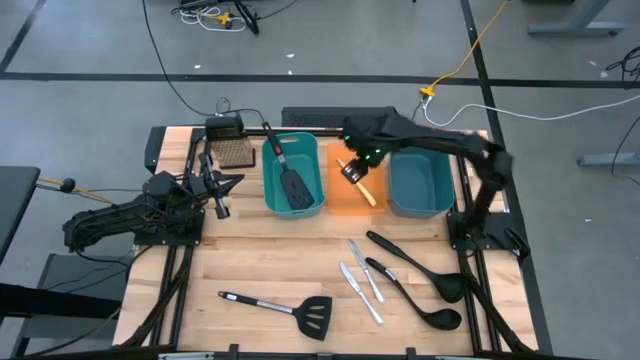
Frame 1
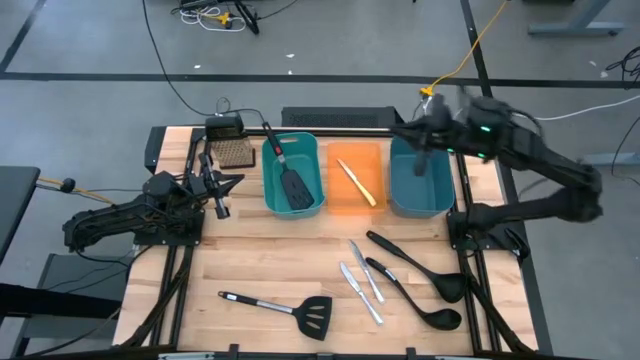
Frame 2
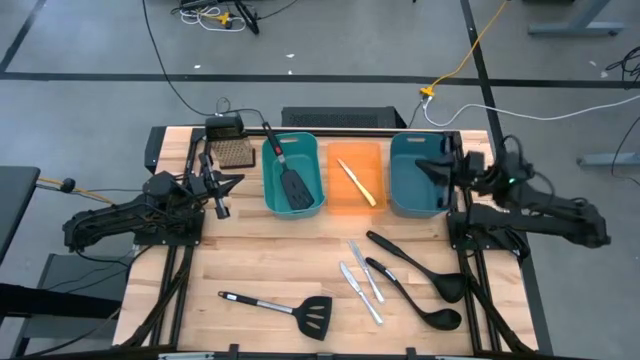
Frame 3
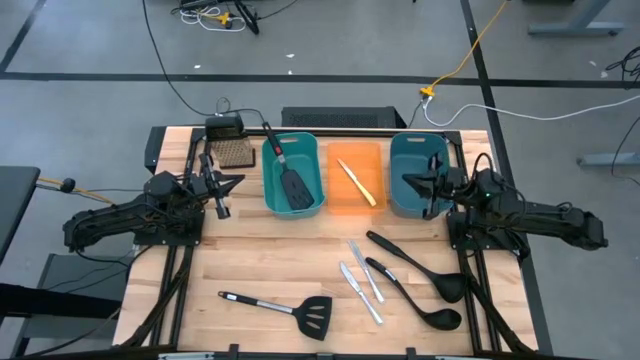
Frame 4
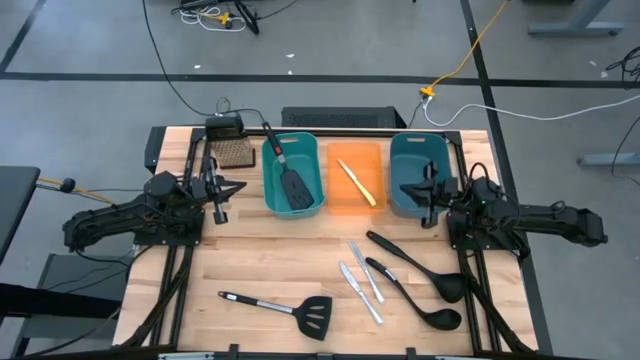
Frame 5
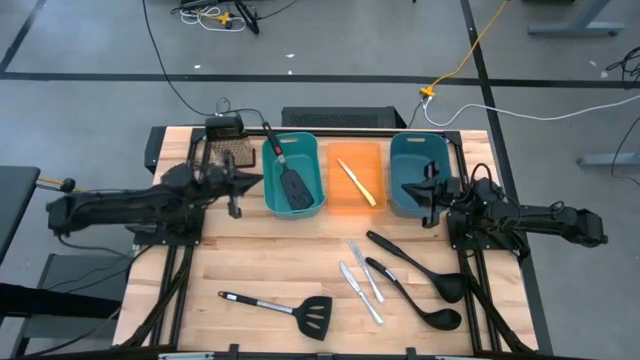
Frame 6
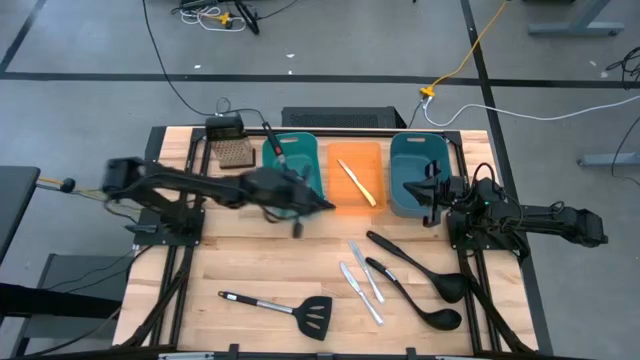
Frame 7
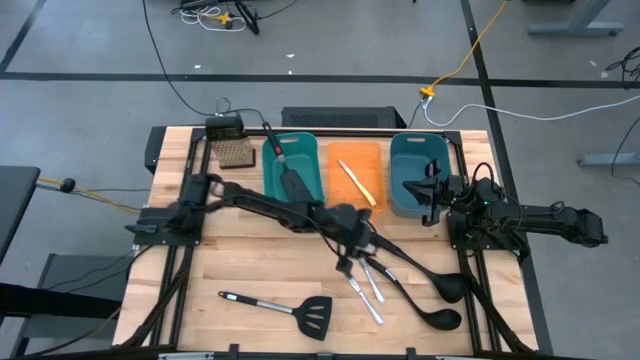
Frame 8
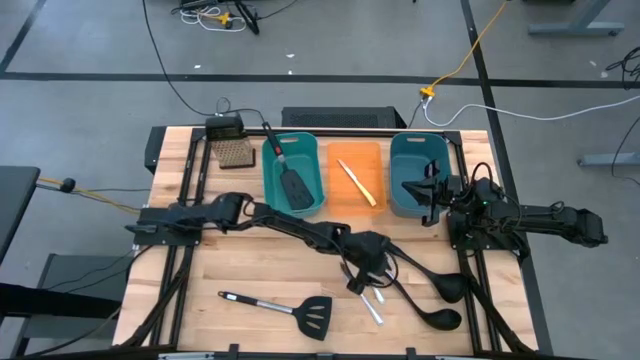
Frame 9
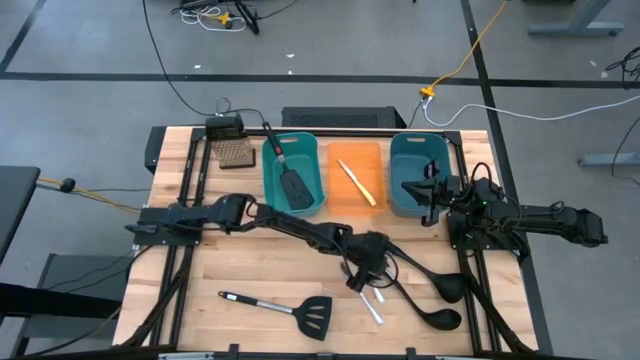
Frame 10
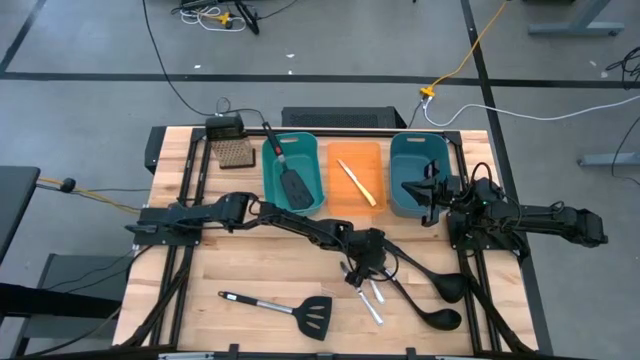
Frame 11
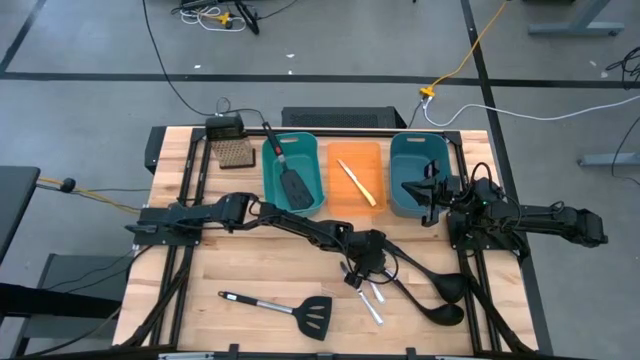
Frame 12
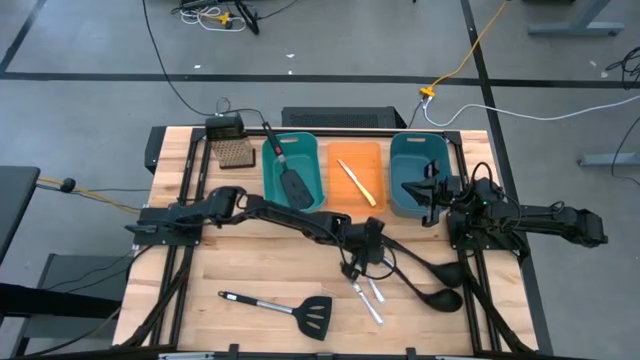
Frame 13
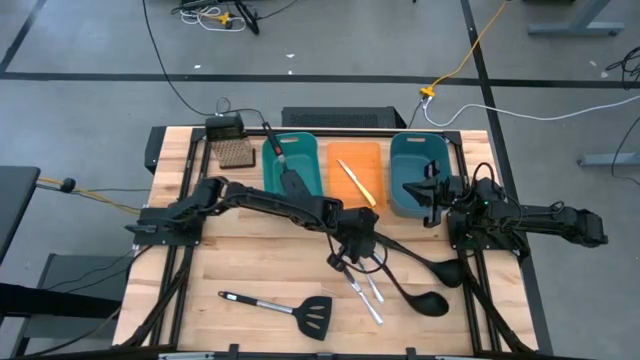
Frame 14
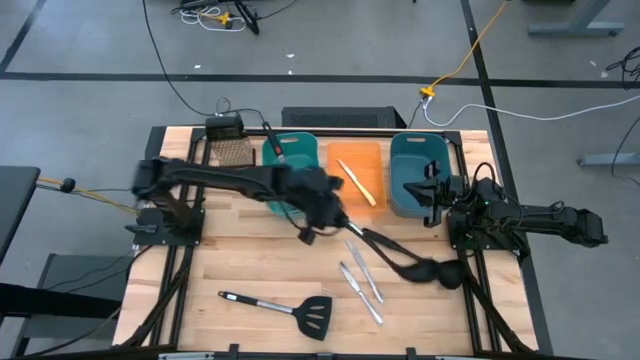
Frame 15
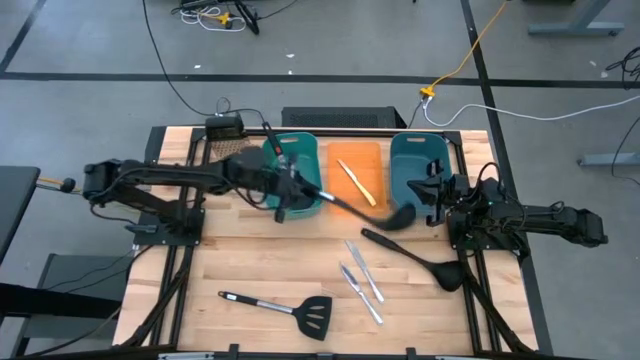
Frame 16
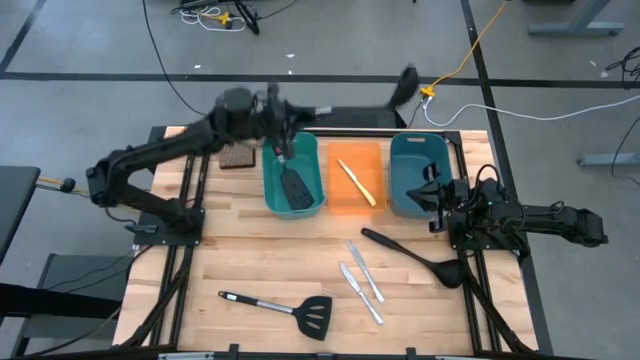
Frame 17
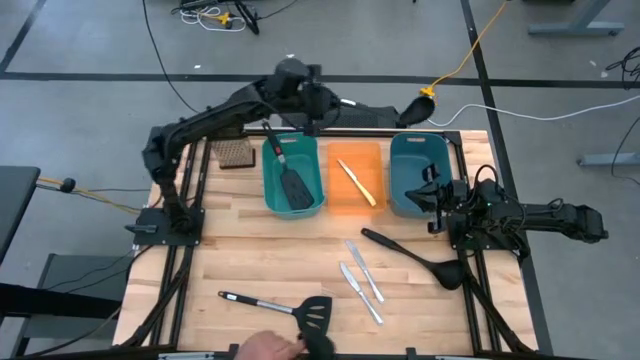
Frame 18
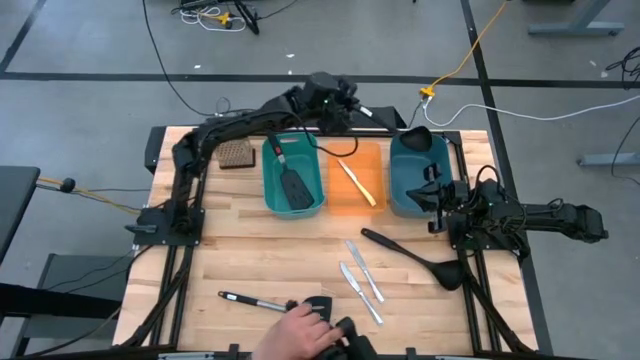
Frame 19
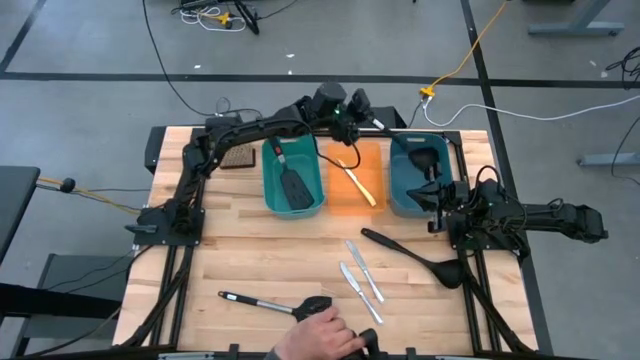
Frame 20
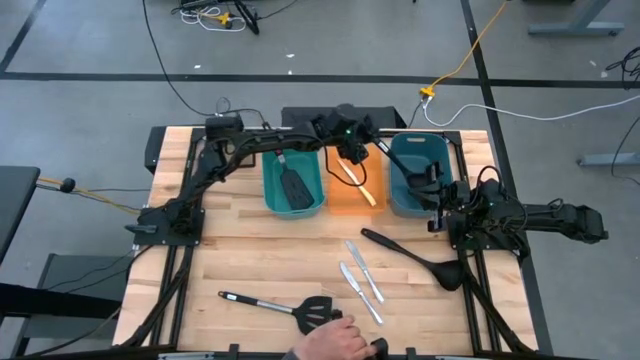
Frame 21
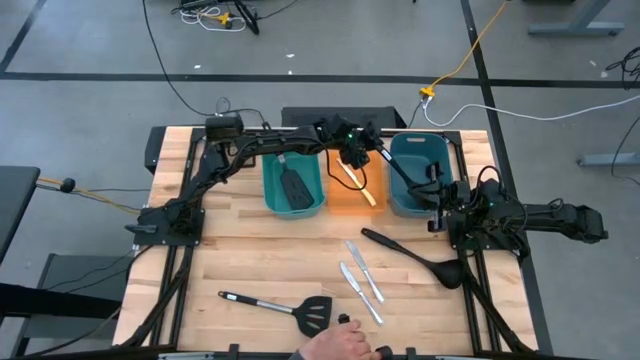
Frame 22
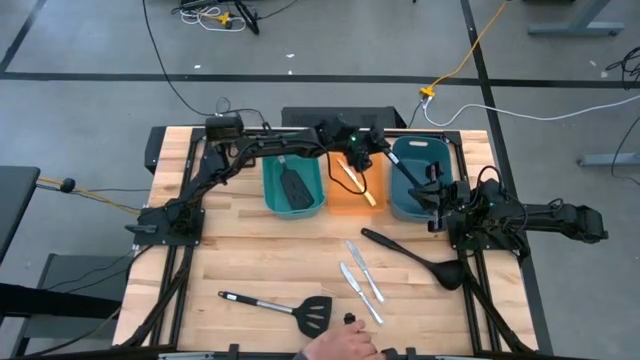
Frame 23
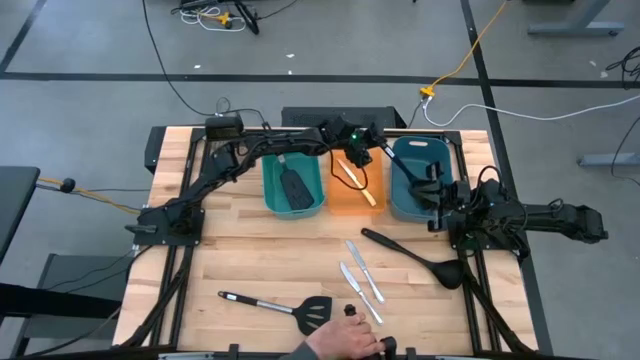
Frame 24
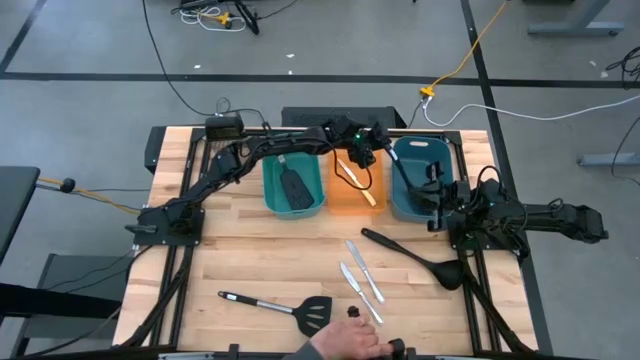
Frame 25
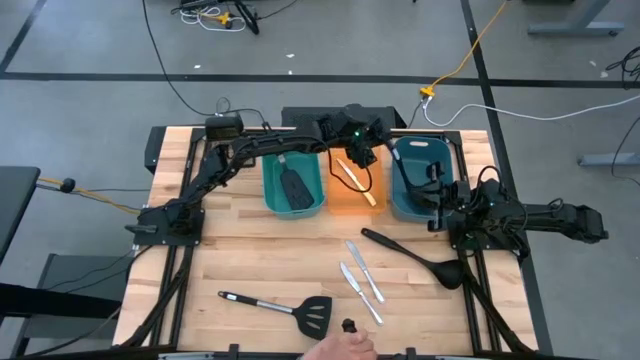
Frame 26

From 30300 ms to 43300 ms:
Task: Pick & Place Kitchen Items
Put the bottom ladle into the blue container

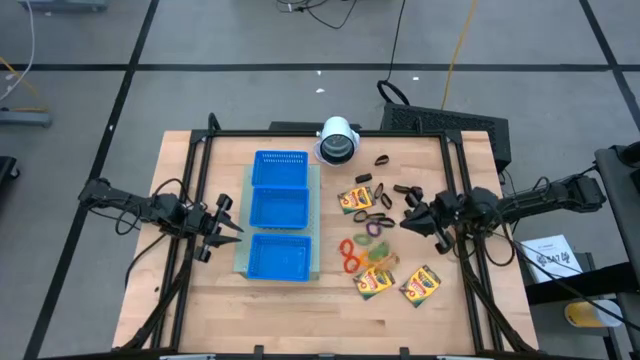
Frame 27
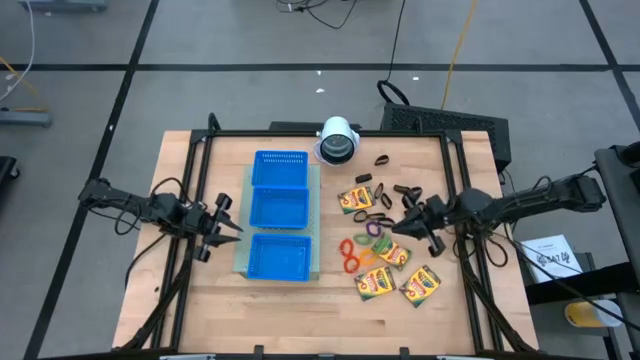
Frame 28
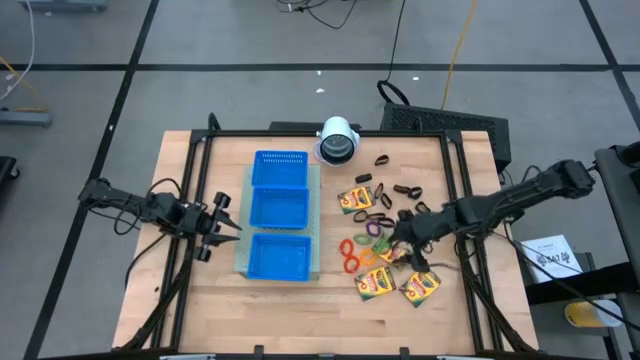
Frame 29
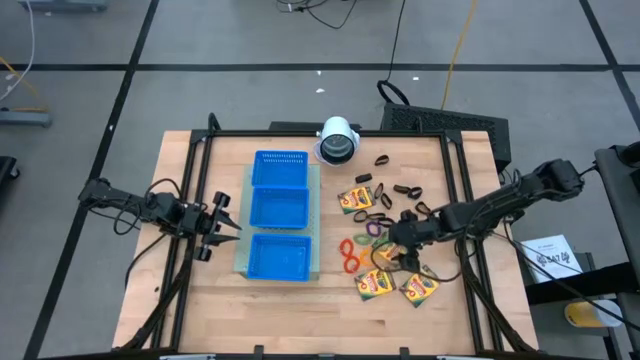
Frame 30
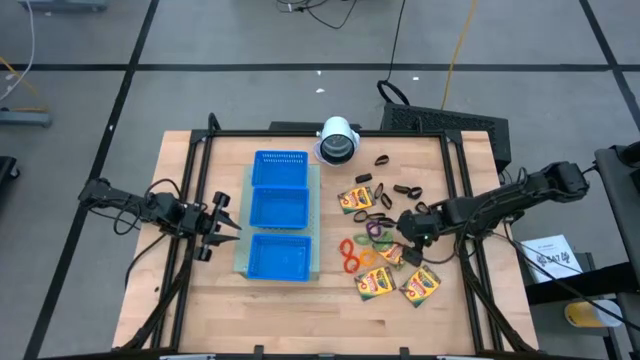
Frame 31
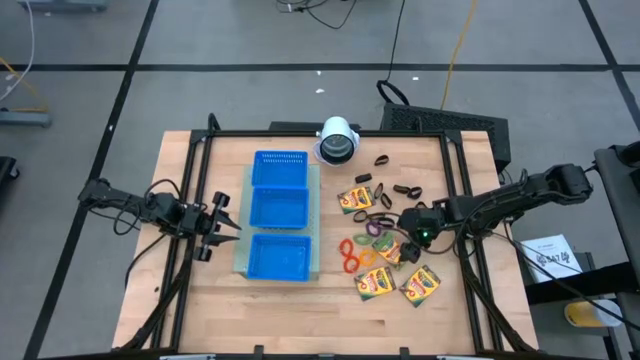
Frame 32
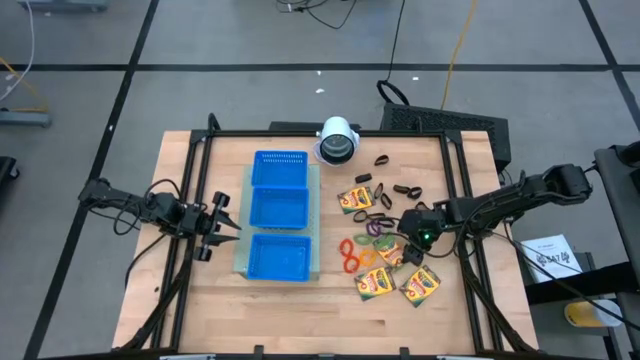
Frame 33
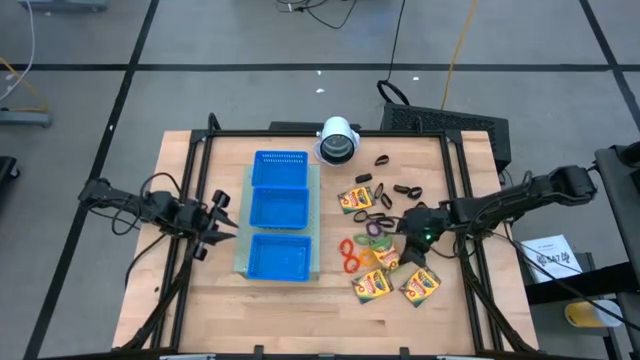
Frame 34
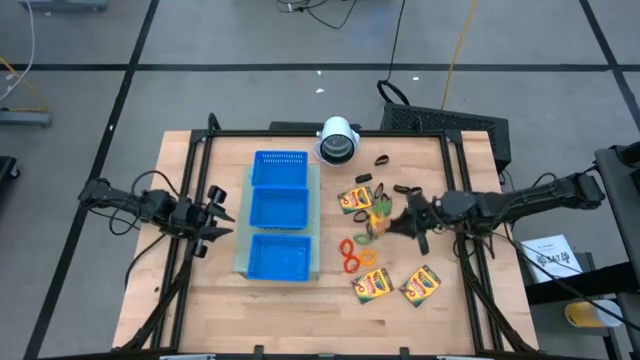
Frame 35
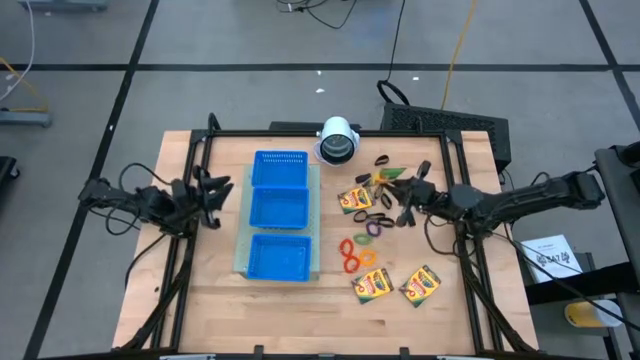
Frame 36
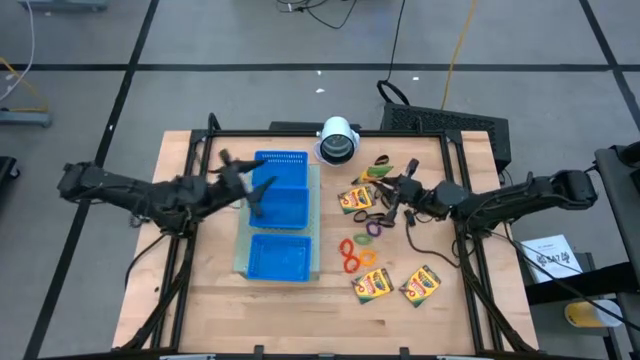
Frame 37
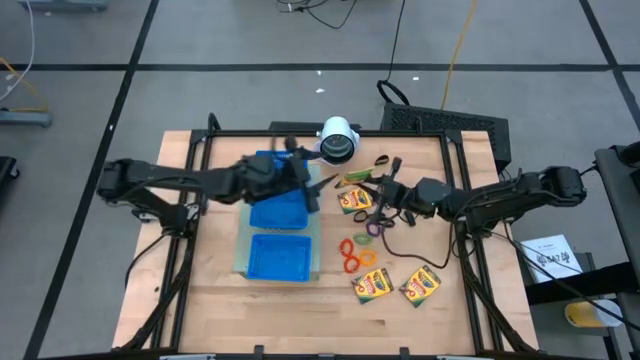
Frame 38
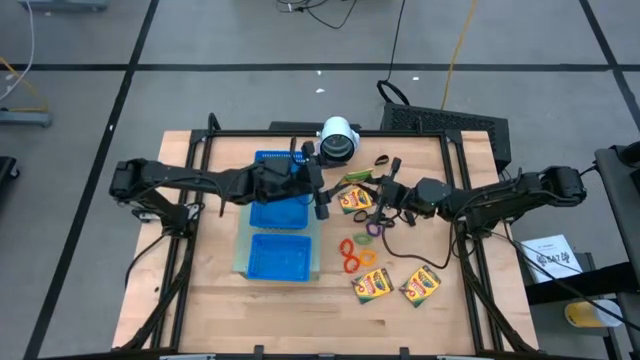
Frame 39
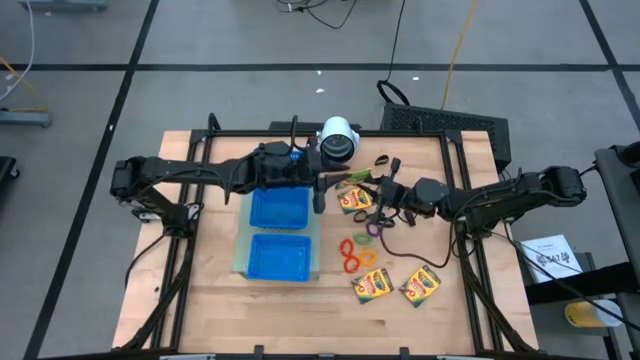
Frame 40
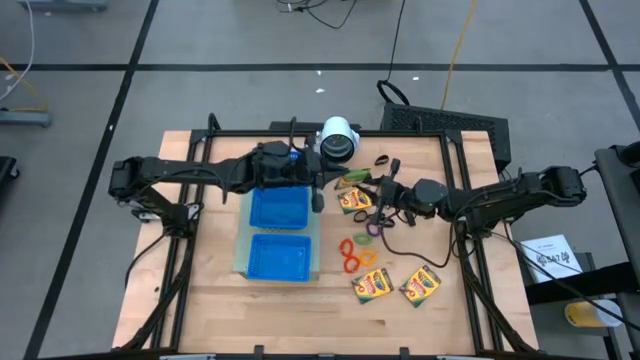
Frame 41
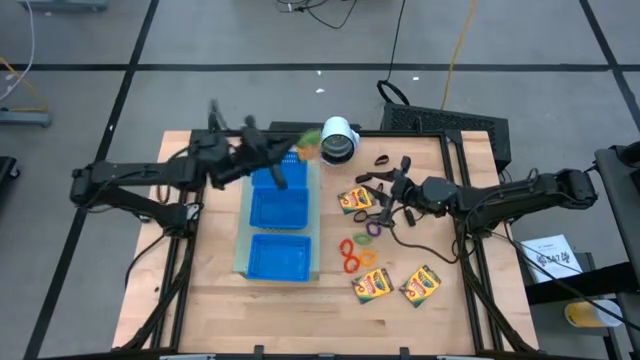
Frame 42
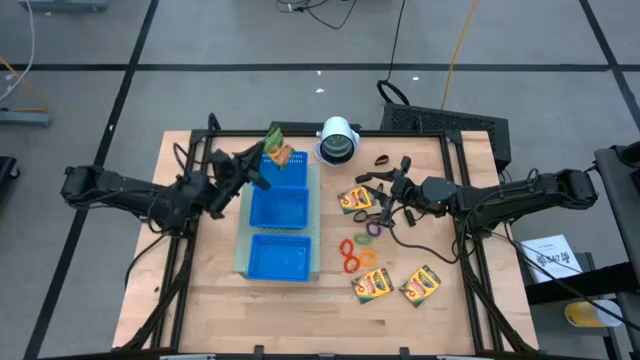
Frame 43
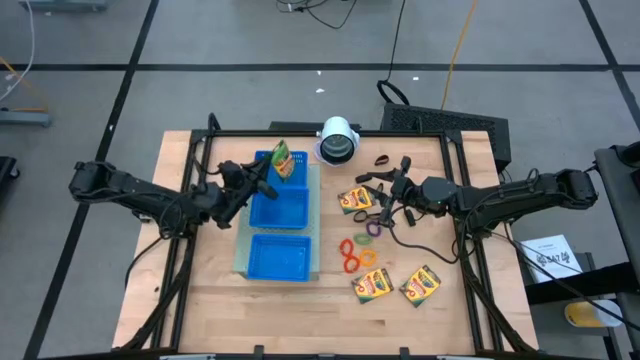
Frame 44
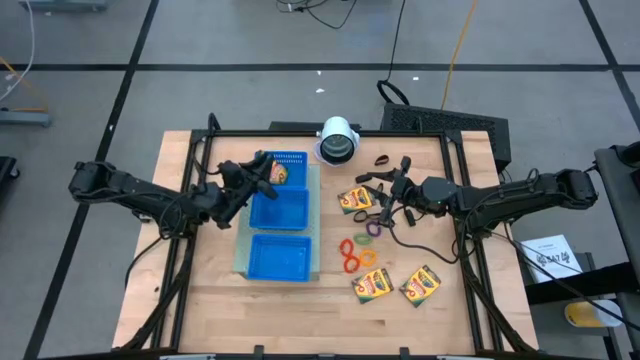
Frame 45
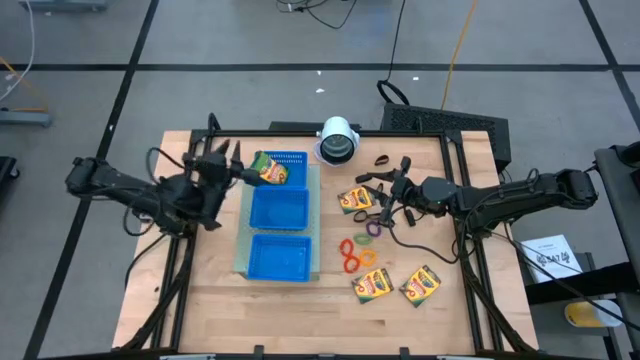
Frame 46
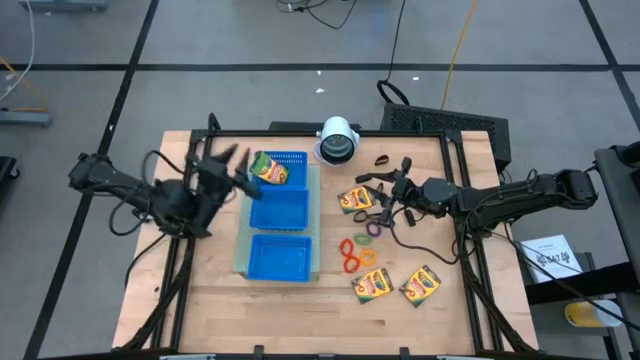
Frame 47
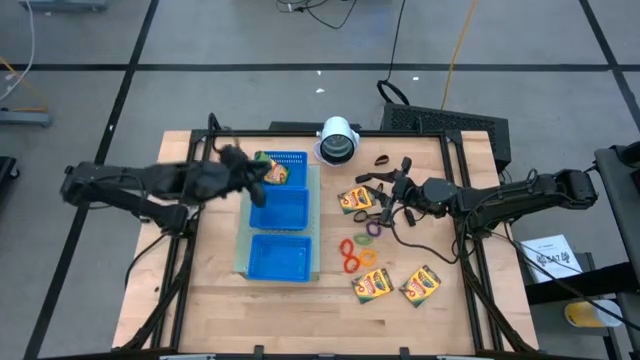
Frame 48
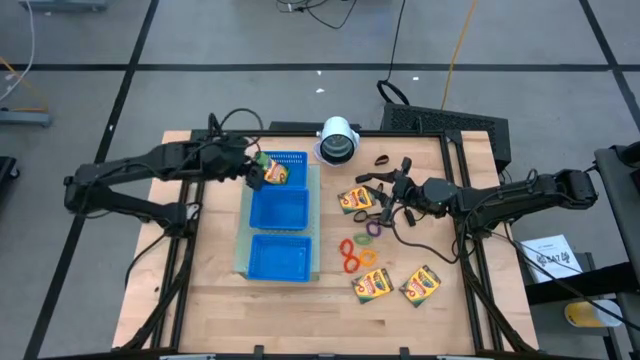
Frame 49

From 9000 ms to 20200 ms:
Task: Pick & Place Office Desk Supplies
Put the crayon box into the top blue bin on the shelf
